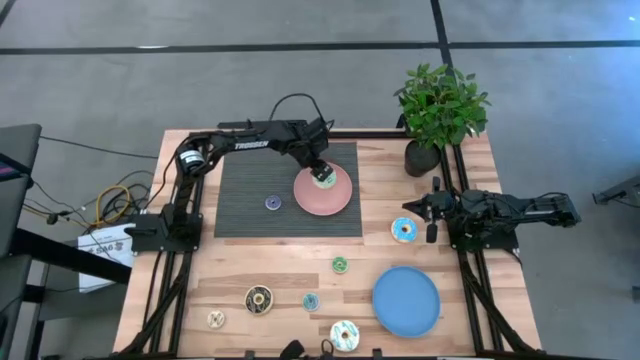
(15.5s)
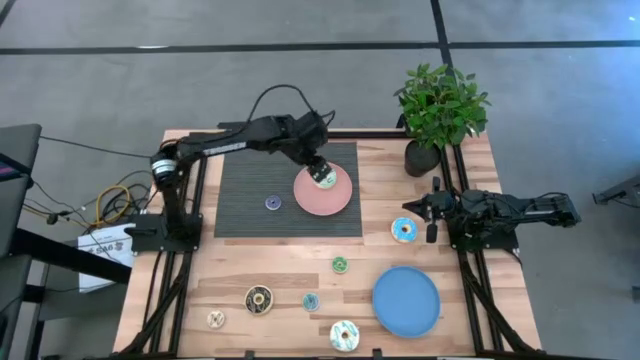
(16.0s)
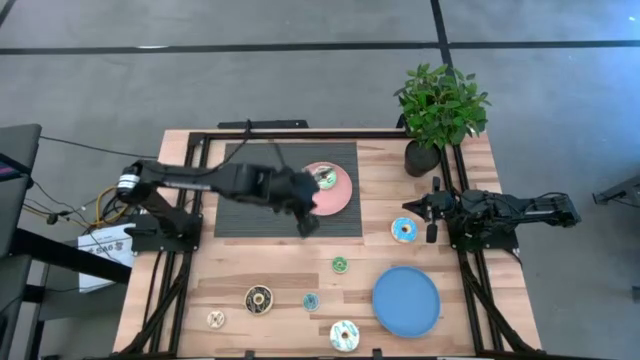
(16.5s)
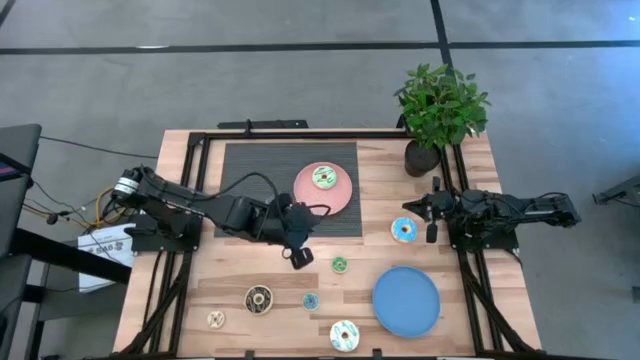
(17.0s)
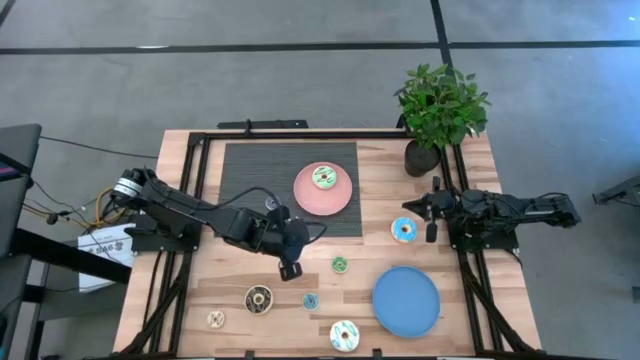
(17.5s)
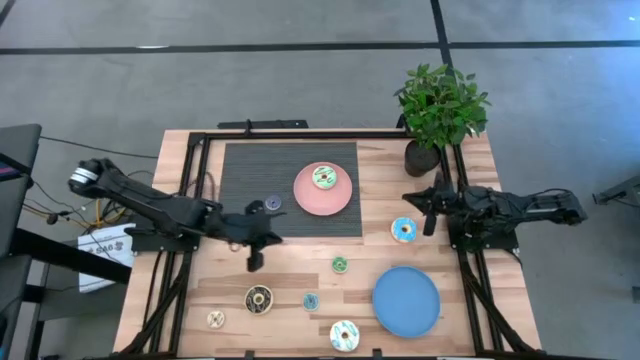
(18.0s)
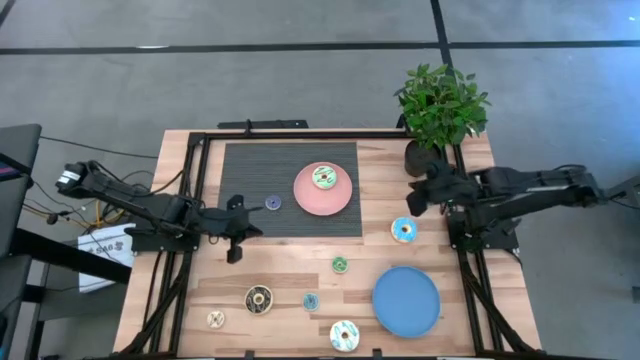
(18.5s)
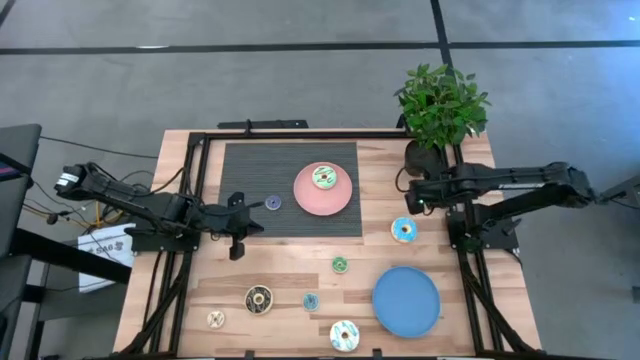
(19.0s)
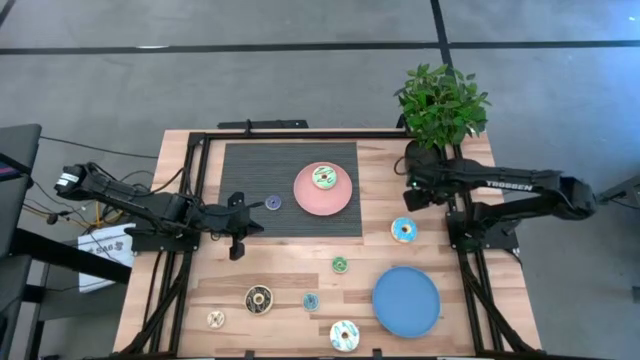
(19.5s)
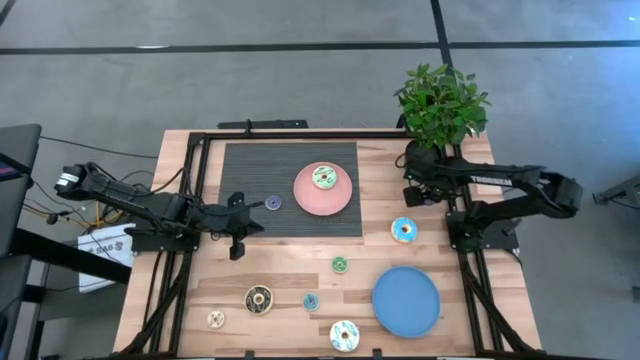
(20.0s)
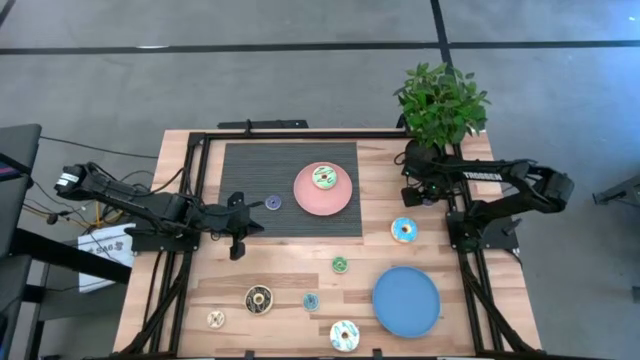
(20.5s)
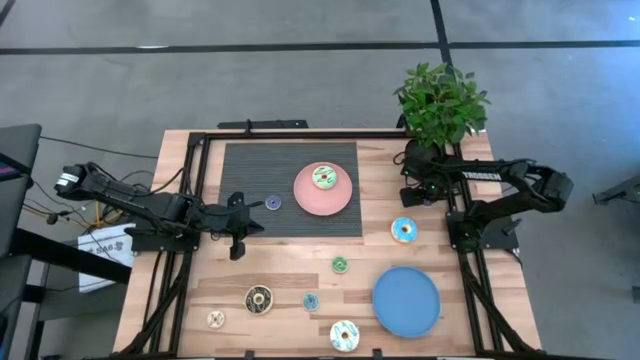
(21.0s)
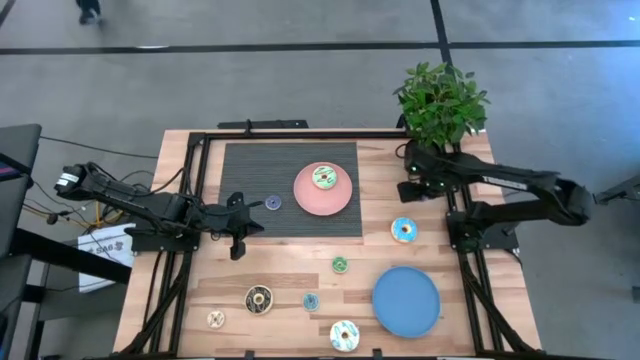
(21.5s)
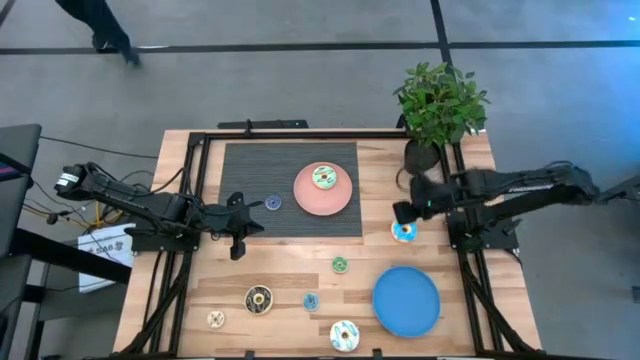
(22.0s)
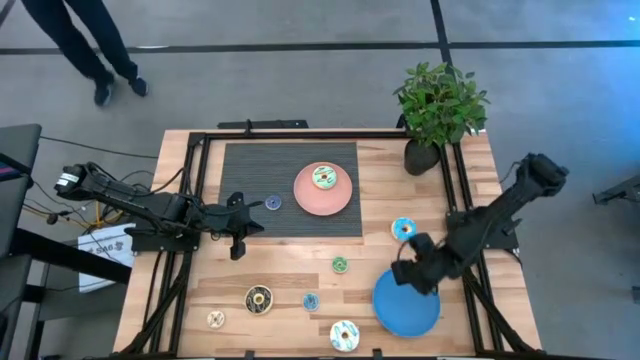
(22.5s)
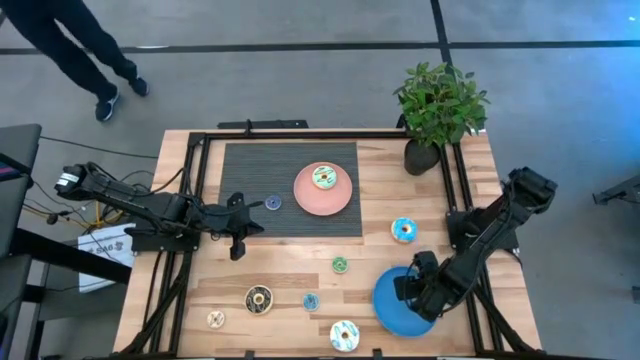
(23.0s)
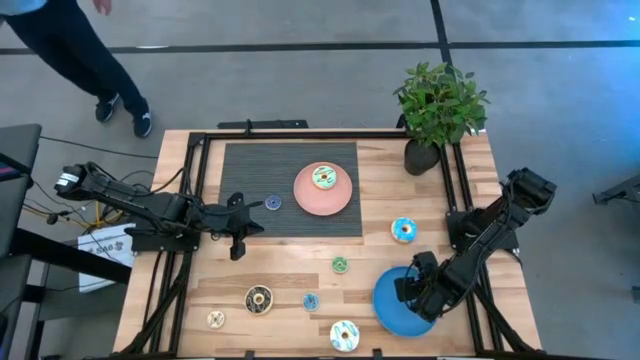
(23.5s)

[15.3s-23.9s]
Task: Pick & Place donuts
Put the right small purple donut on the blue plate

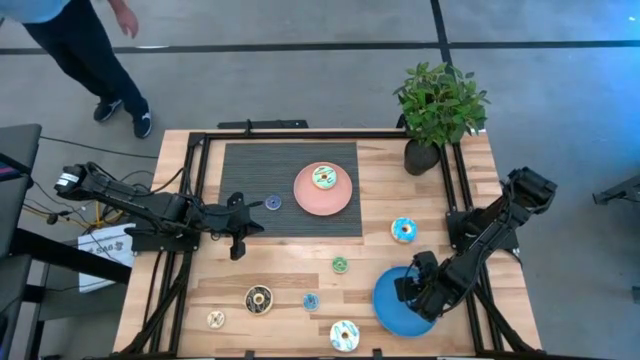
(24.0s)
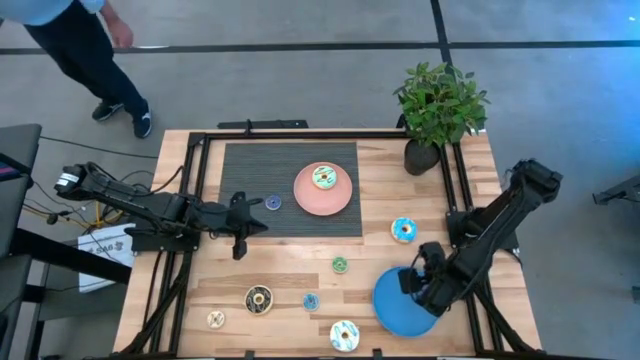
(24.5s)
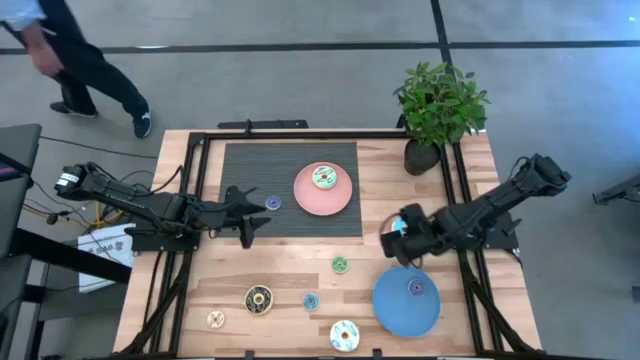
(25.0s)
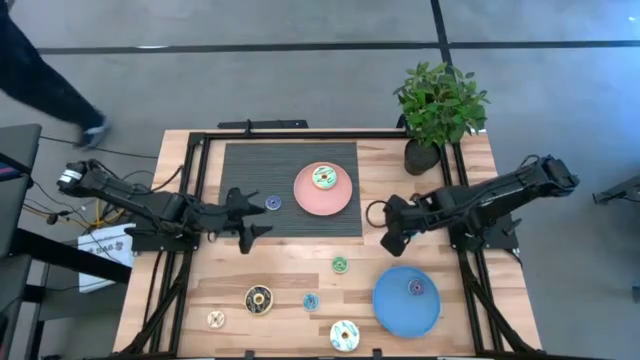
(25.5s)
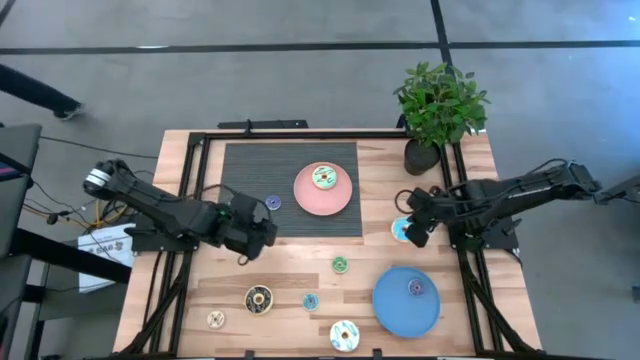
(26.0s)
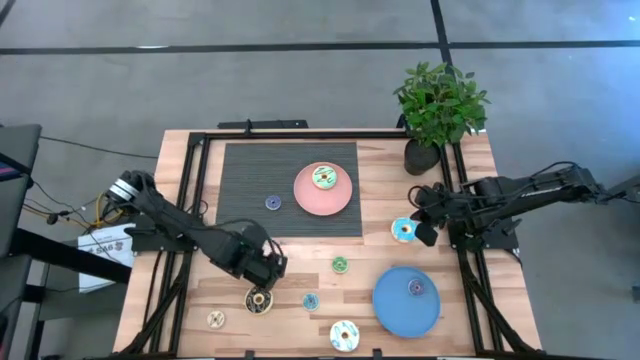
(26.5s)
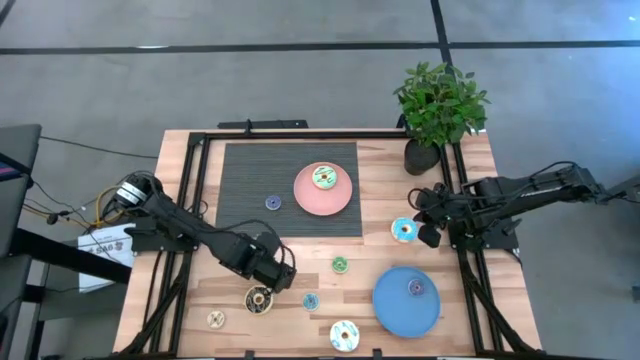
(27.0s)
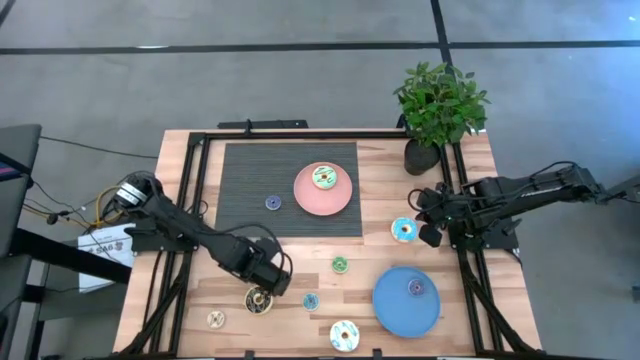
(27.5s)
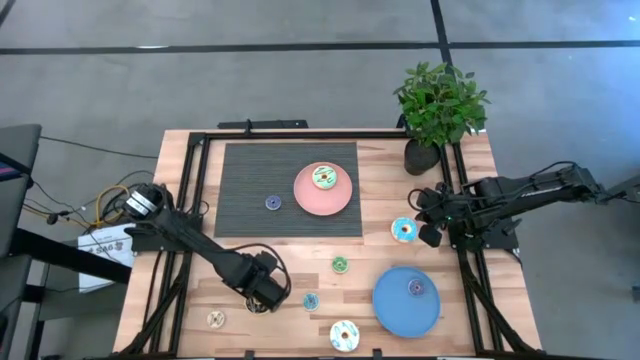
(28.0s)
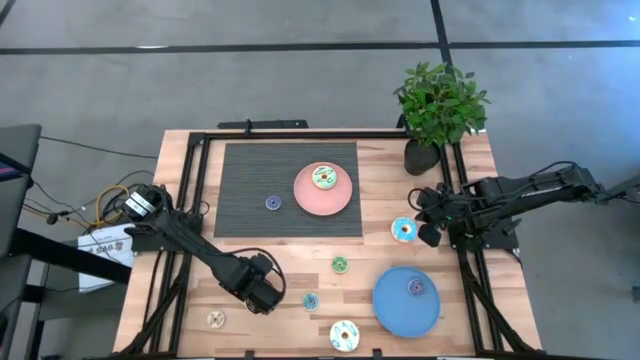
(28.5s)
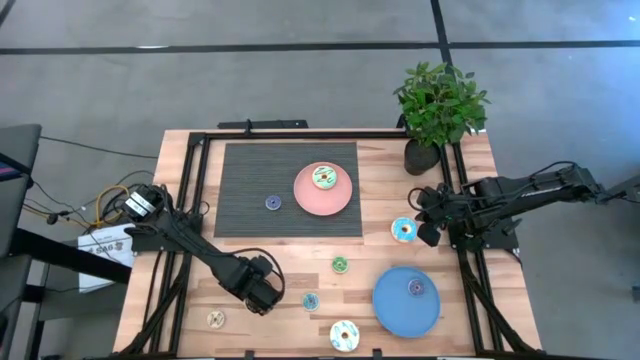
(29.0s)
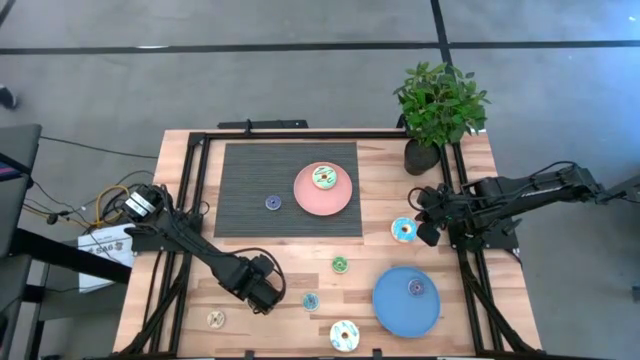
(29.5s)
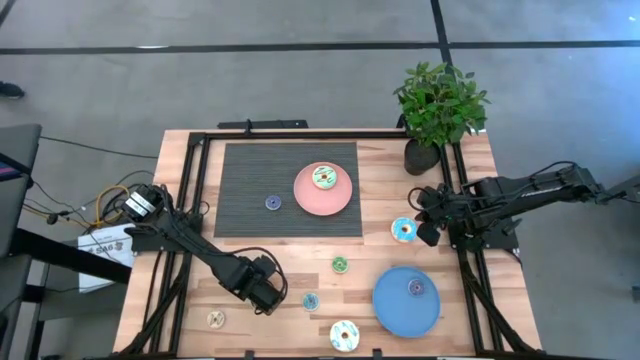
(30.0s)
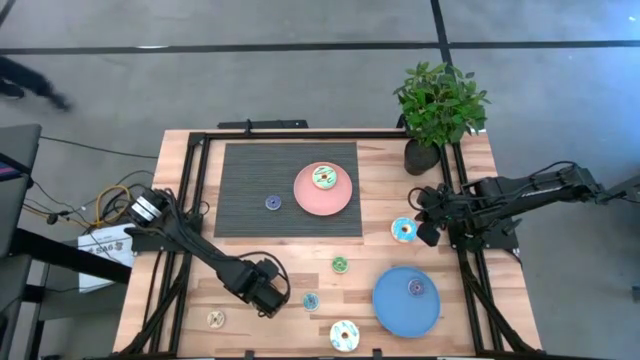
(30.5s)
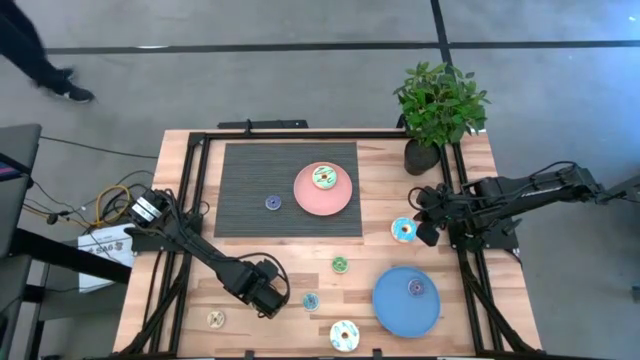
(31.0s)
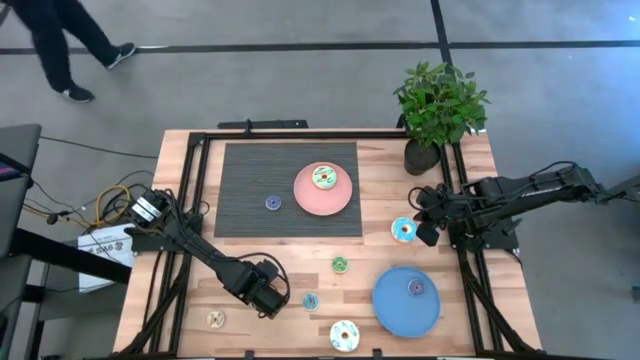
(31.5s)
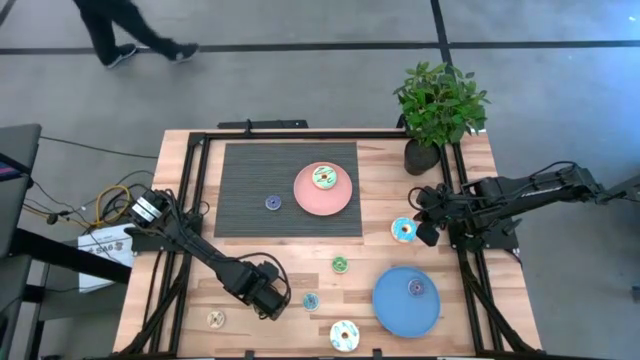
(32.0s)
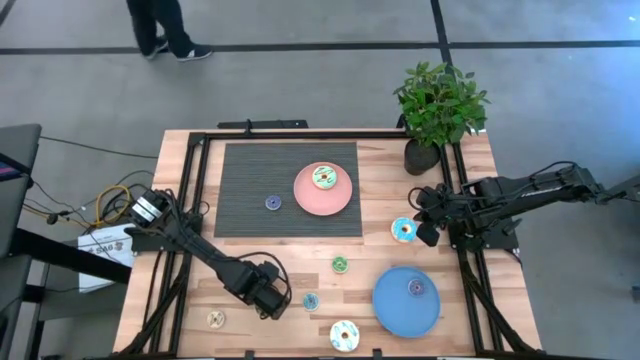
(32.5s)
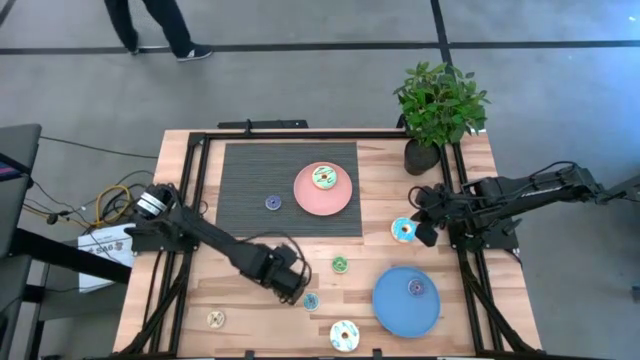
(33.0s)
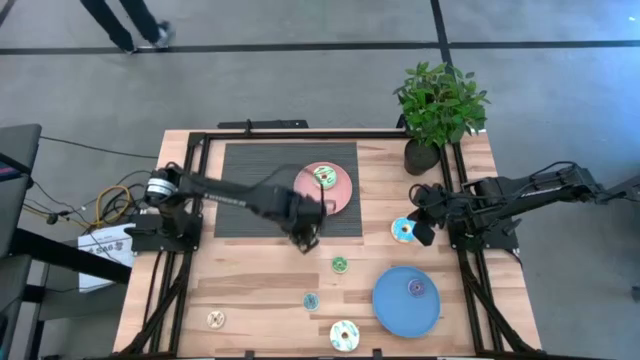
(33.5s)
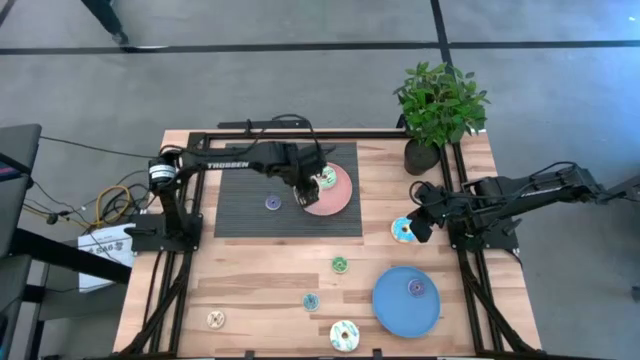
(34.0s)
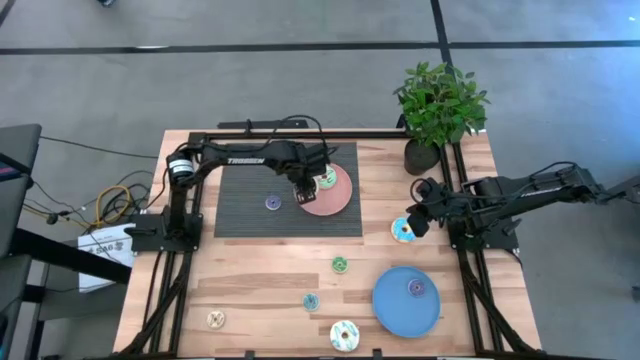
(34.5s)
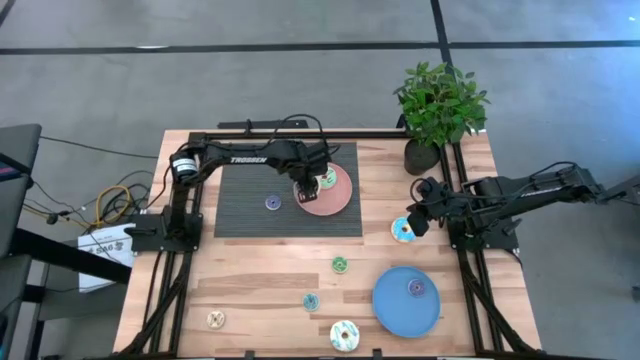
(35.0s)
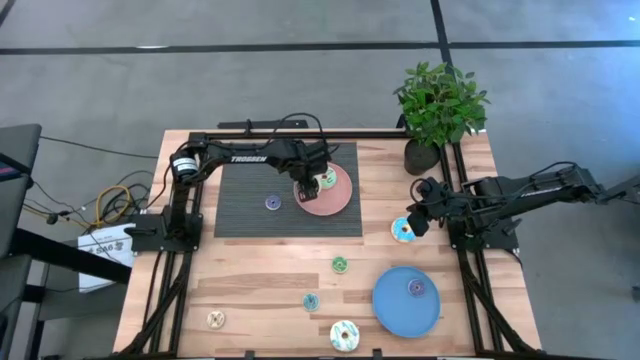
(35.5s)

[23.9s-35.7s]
Put the big black donut on the pink plate

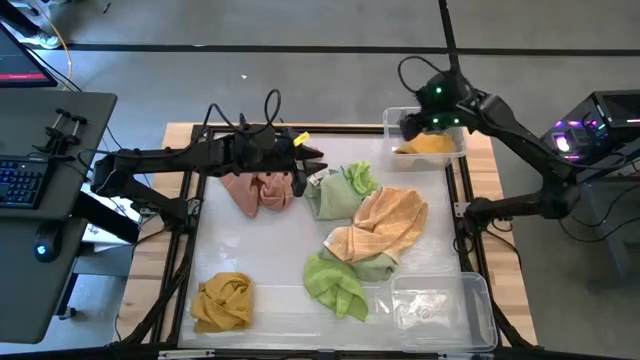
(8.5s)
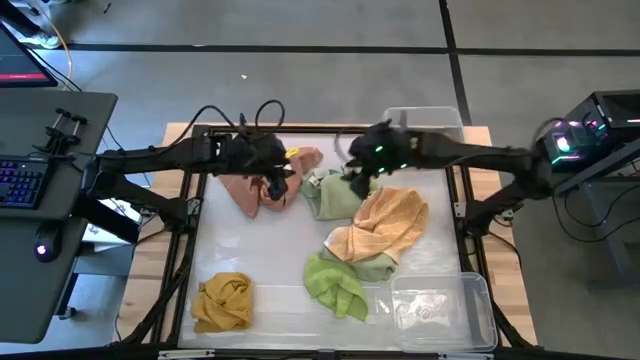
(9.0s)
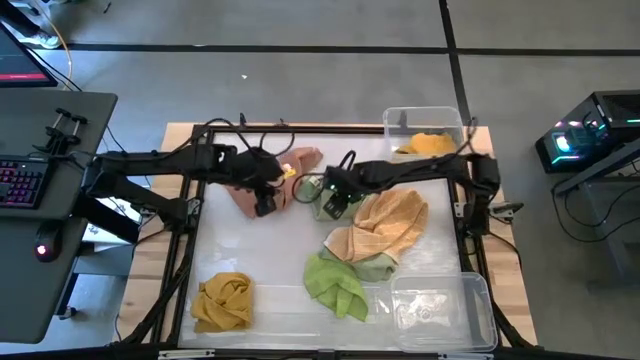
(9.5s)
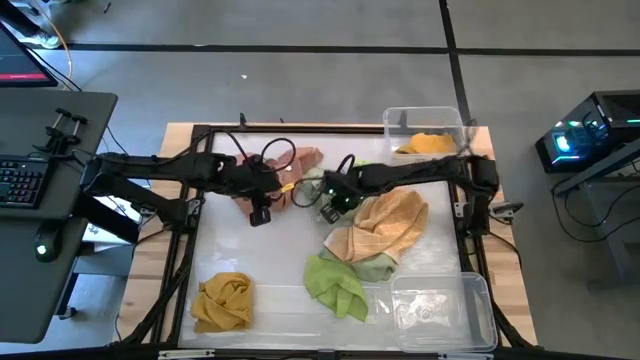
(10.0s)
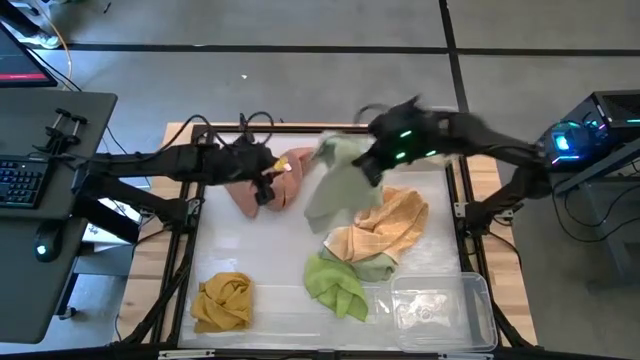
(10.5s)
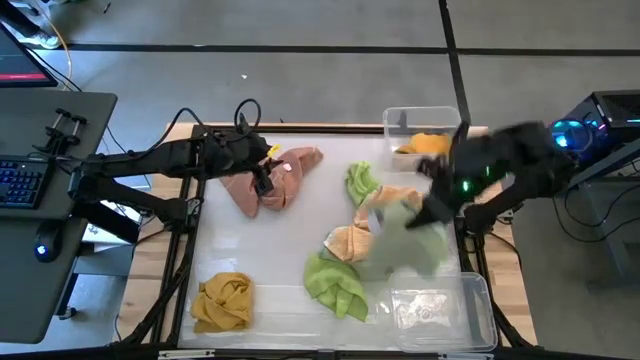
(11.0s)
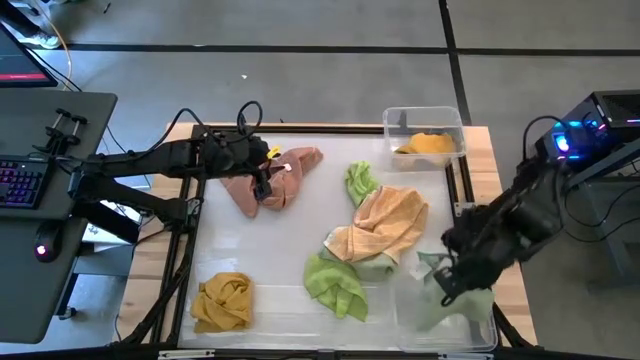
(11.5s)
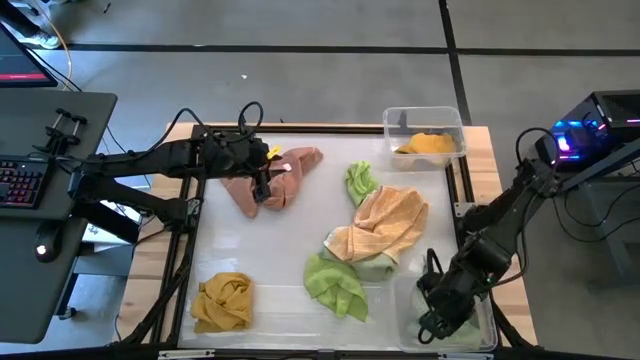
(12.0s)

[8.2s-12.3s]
Task: Sort towels by color in basket
Put the top green towel into the bottom transparent bin
